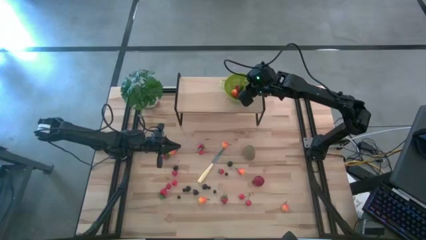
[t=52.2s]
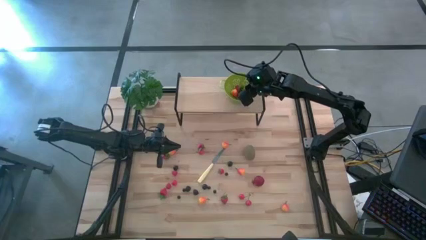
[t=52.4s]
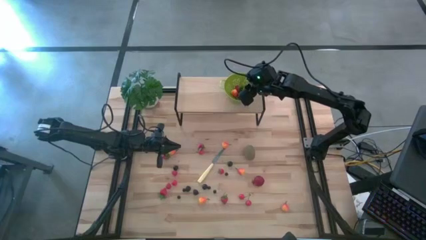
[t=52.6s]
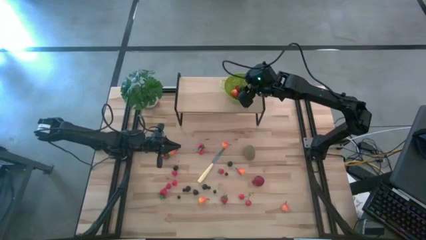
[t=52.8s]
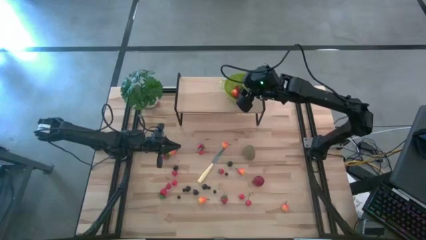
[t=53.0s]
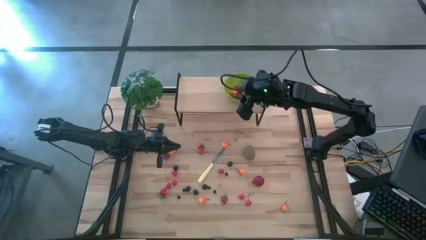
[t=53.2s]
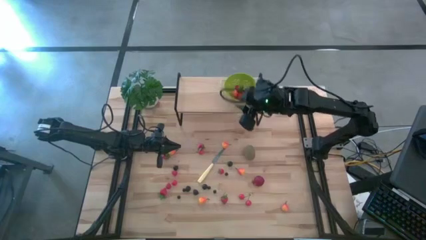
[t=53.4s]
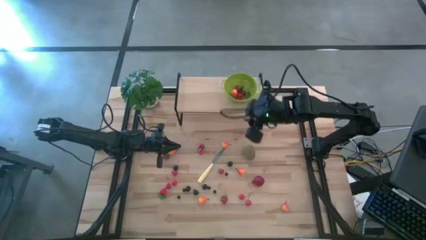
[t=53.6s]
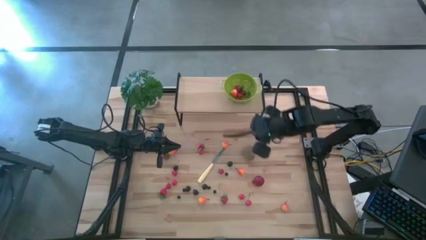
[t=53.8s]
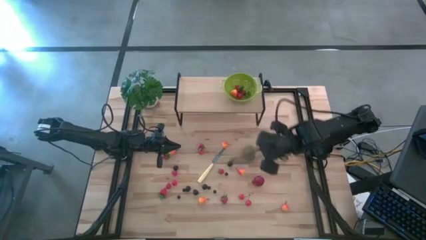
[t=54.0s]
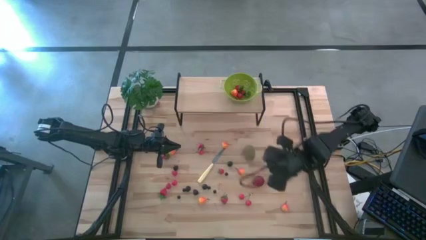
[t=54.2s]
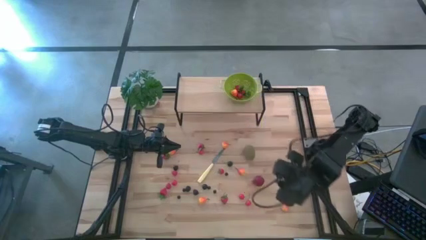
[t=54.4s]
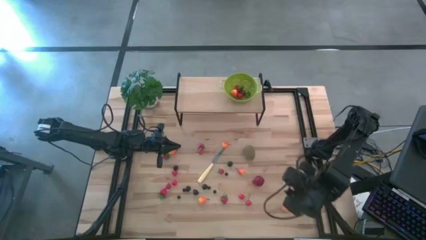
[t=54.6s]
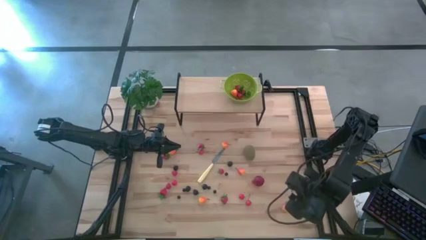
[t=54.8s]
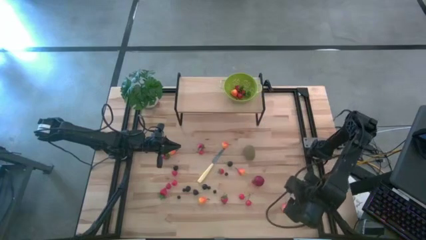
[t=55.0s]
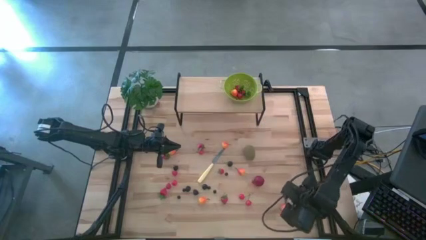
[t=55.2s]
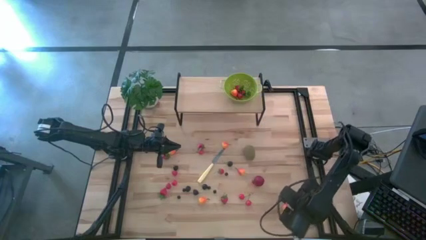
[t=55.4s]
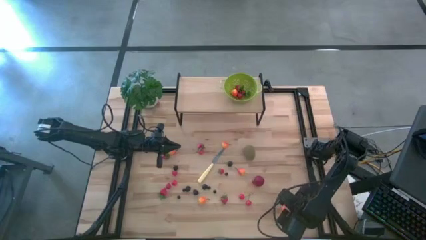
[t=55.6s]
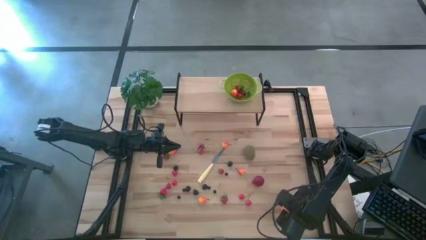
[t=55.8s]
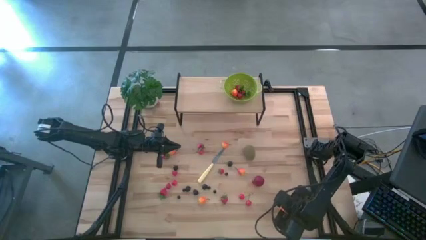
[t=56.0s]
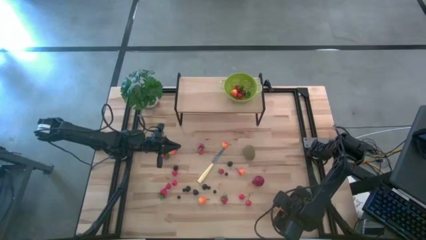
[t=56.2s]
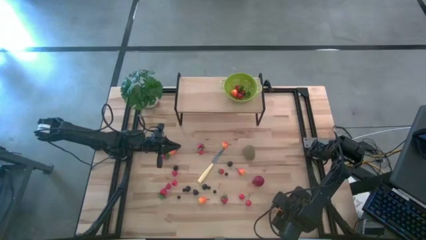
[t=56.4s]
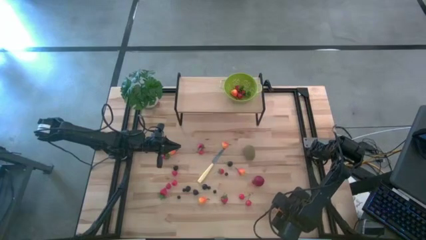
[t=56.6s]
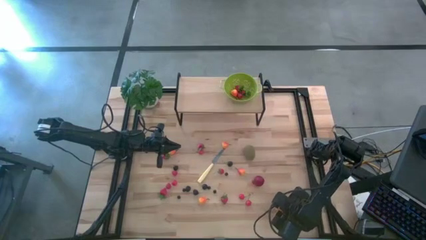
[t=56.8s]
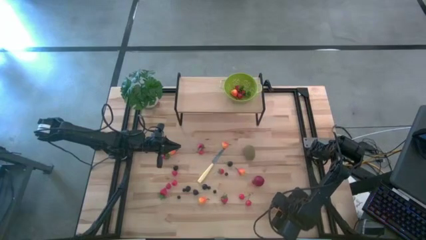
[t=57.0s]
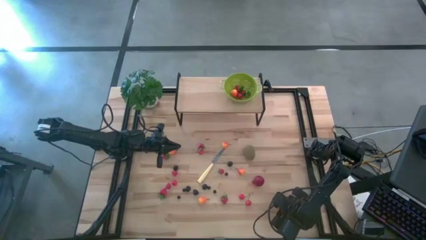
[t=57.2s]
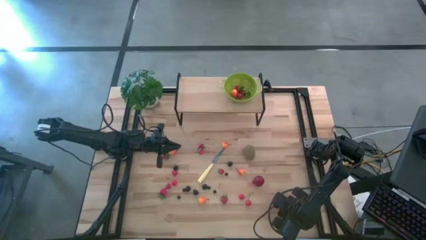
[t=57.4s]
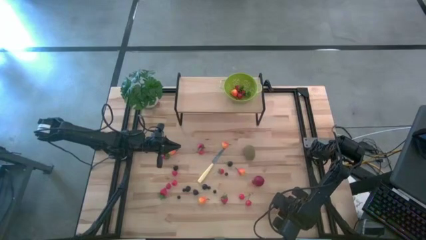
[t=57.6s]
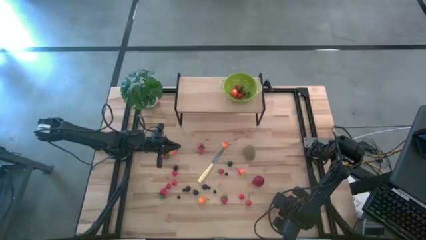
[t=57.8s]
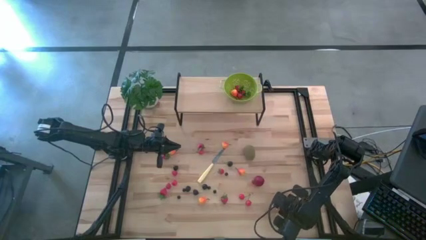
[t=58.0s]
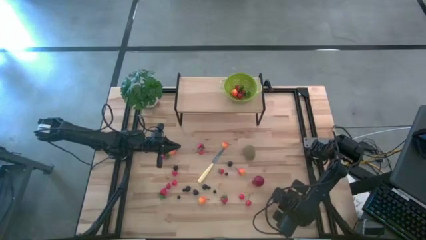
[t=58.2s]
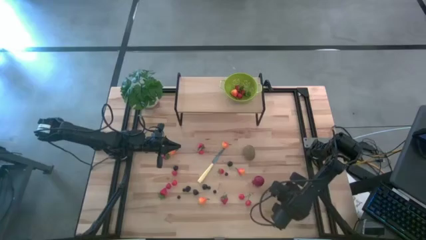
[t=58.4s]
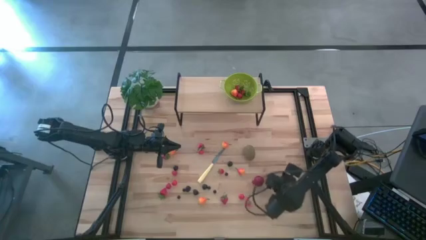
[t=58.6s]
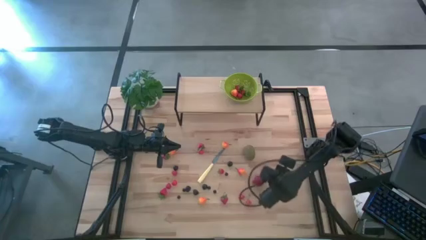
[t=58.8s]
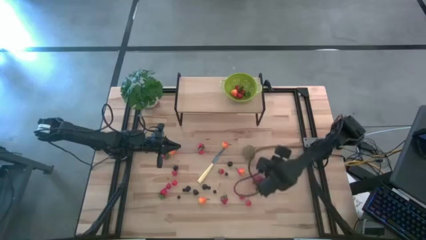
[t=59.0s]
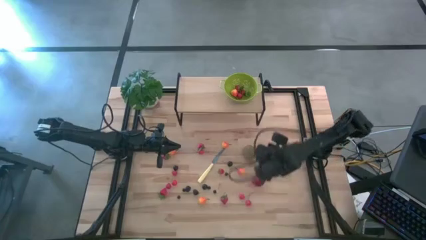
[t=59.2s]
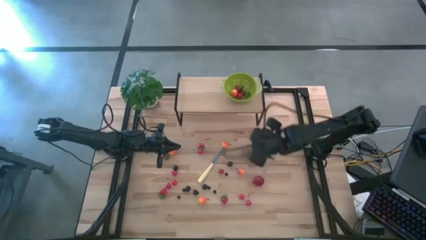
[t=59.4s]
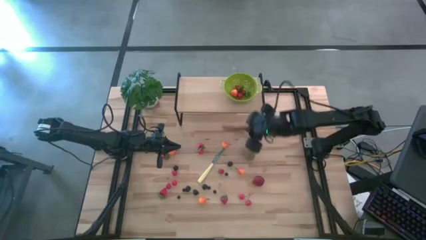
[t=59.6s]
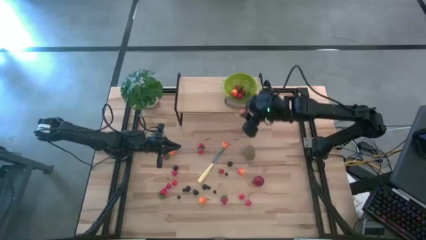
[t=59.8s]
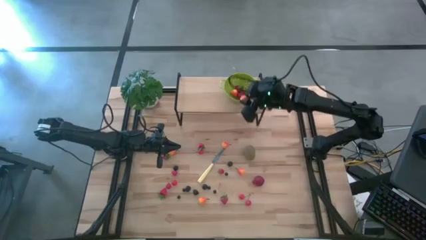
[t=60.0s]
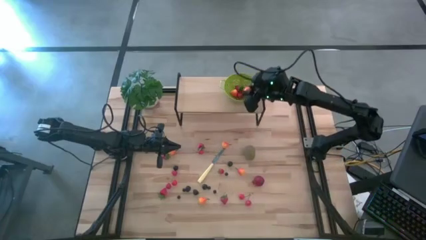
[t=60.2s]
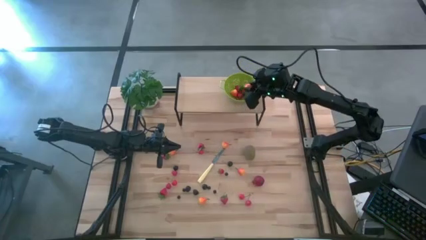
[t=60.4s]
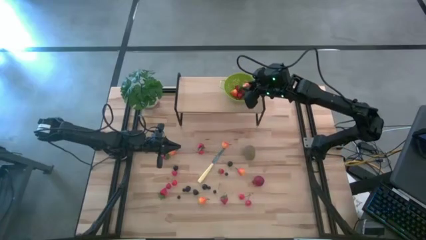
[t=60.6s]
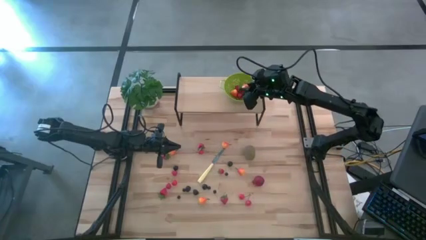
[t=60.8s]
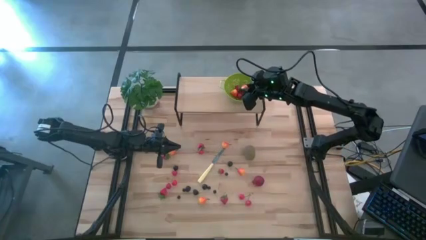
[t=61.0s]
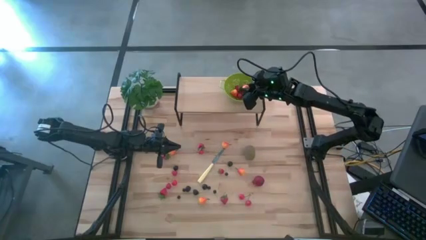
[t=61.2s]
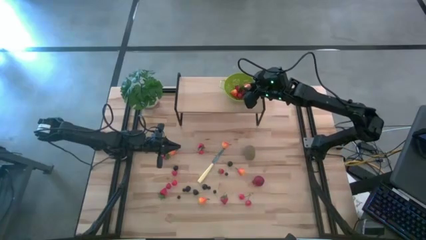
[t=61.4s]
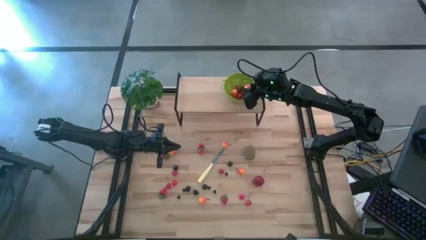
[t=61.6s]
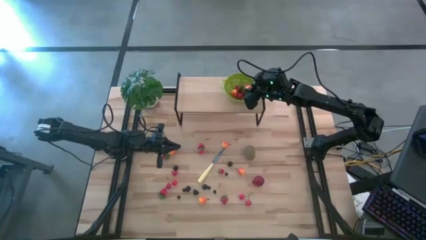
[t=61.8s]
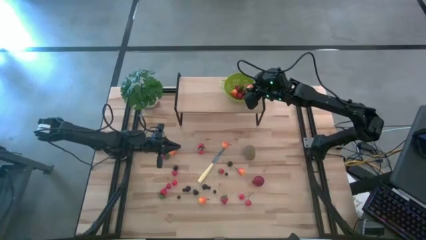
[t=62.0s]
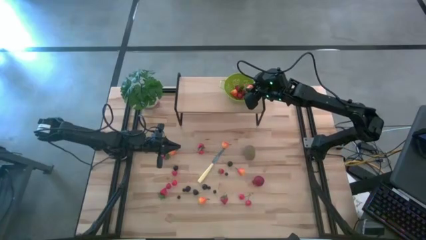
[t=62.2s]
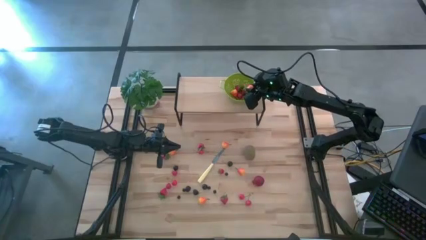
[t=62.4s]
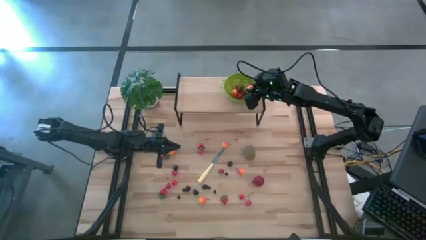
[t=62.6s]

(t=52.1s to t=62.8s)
Task: Pick & Place Fruit
Put the pear into the strainer bowl

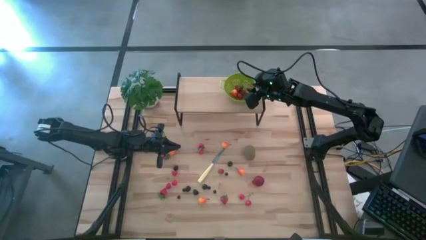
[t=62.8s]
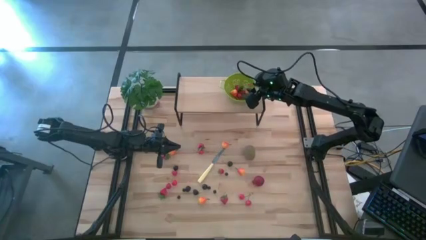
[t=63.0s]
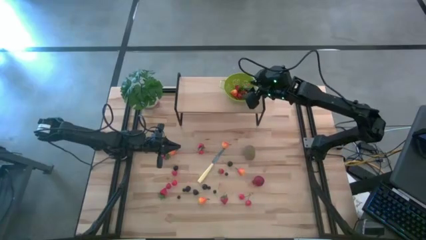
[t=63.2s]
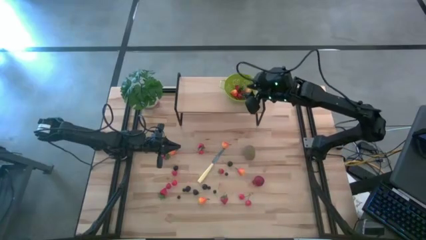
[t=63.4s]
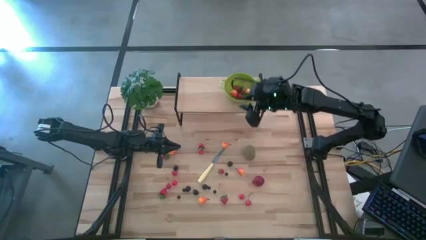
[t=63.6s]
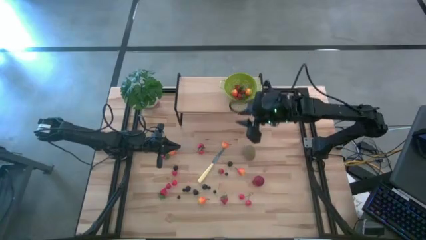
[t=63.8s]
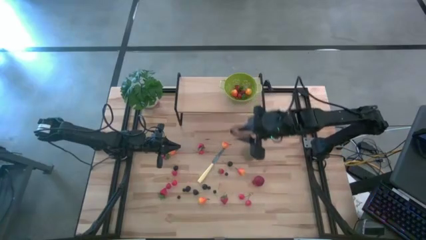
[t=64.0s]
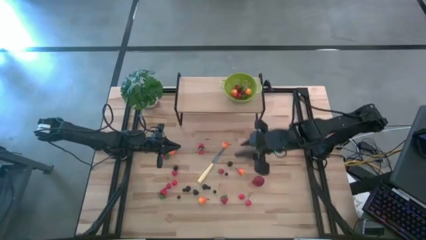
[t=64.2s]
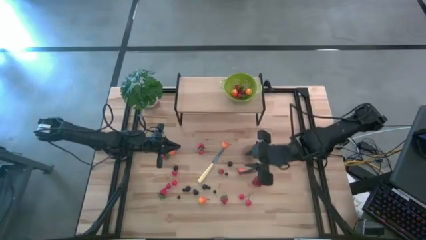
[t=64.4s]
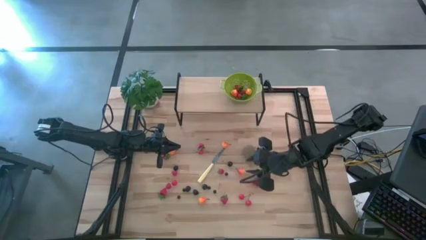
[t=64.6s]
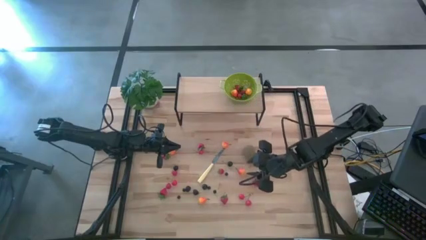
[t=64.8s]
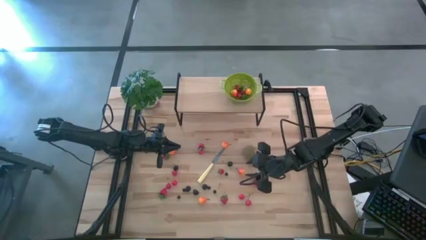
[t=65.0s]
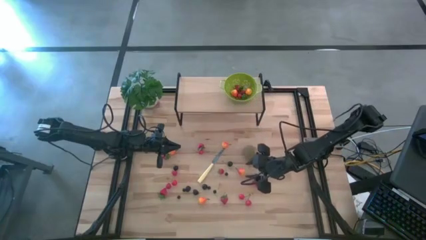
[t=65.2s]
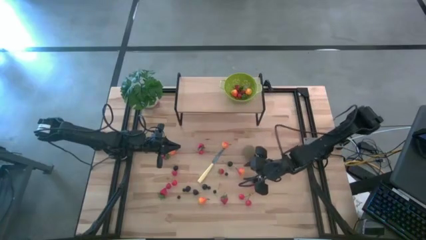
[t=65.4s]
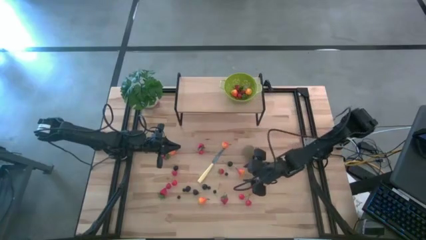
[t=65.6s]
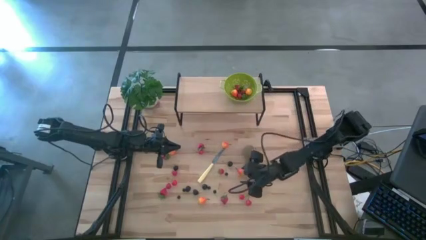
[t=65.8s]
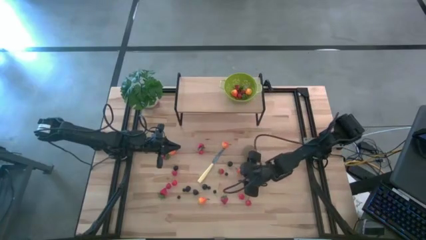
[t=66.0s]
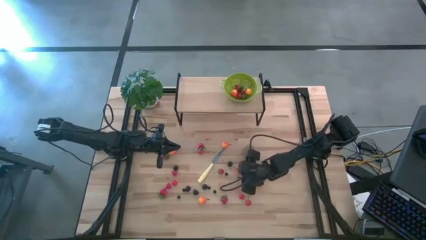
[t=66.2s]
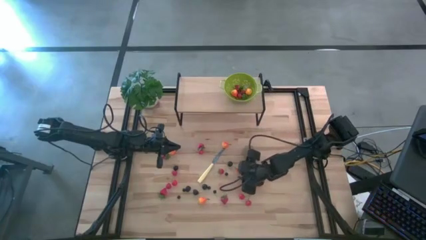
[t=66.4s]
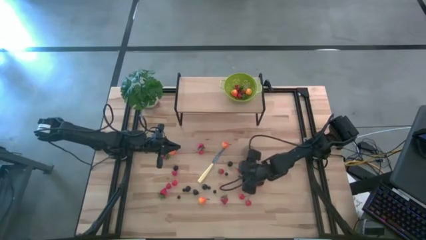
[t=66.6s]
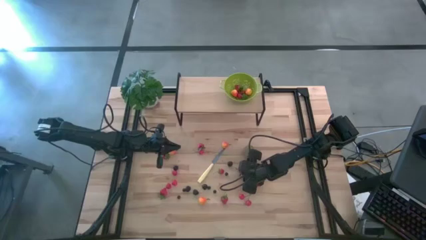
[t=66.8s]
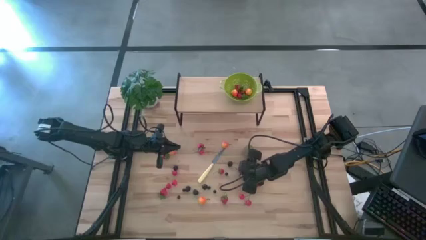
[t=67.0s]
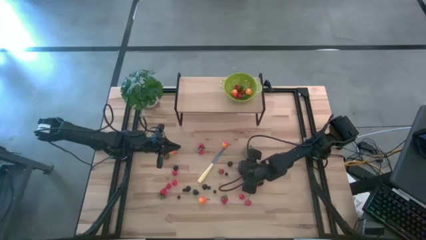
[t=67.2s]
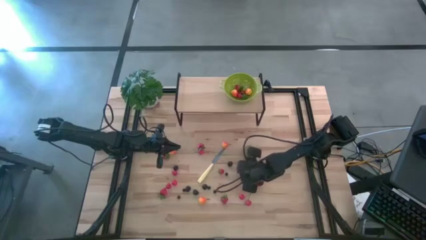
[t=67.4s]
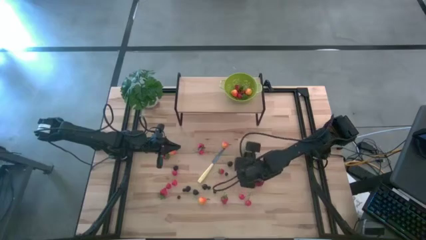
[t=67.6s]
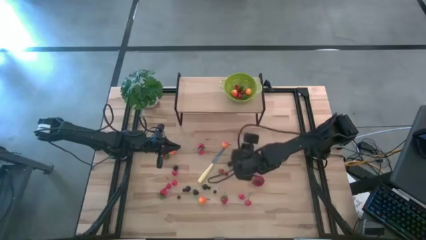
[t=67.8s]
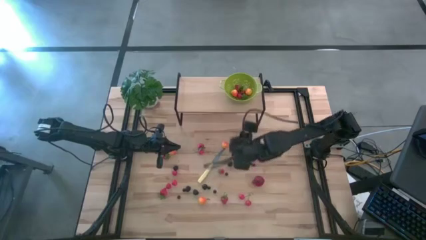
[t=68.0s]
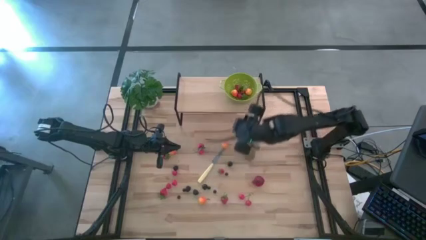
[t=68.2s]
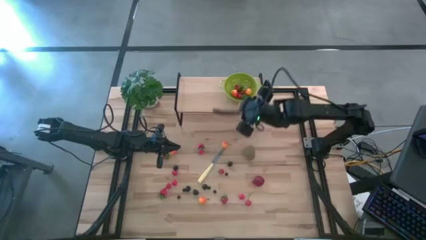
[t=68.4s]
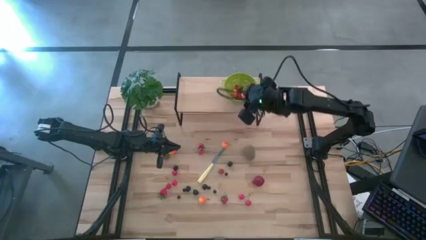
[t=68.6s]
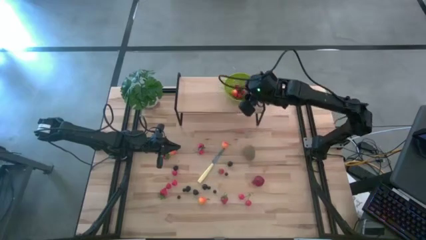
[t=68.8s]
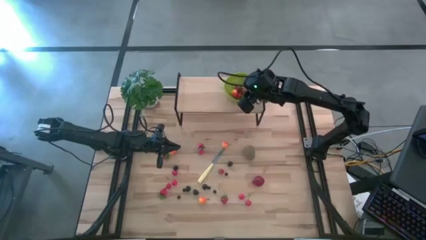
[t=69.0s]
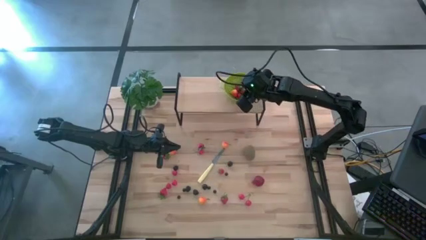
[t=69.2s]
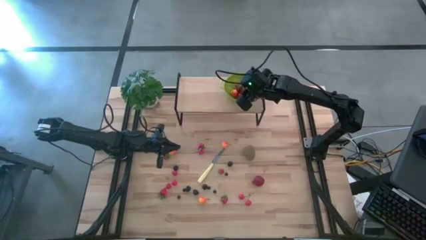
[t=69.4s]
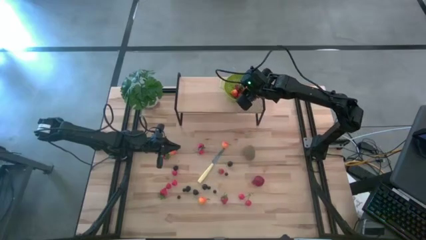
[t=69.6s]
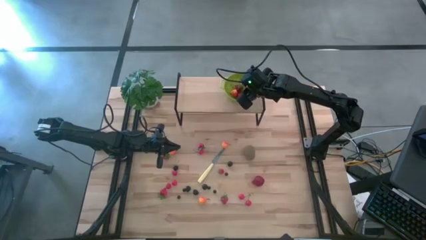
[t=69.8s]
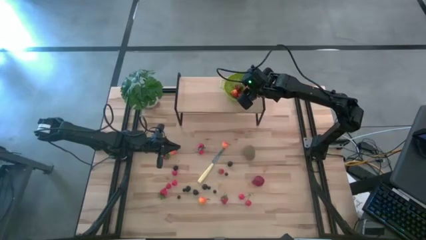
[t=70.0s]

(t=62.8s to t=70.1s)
Put the pear into the strainer bowl
